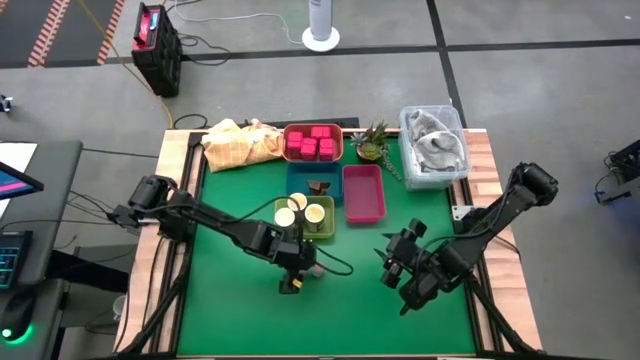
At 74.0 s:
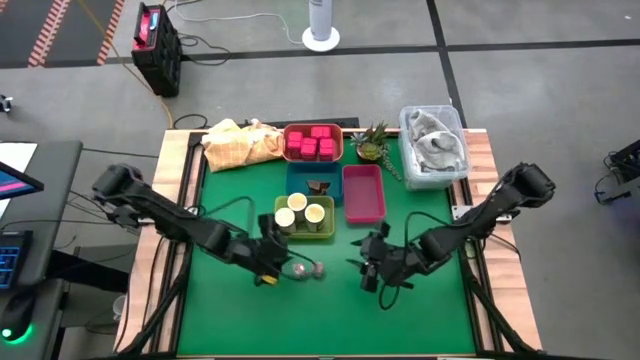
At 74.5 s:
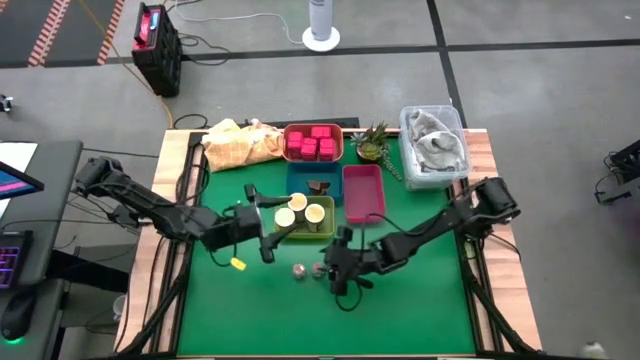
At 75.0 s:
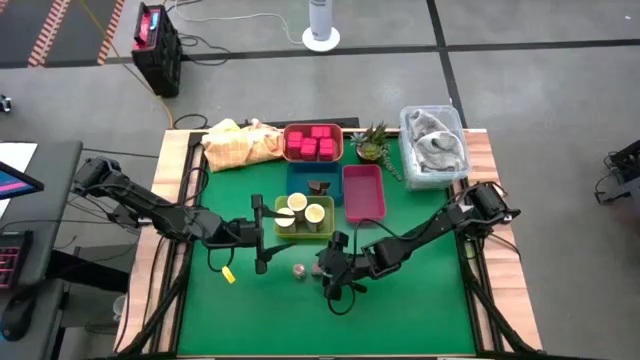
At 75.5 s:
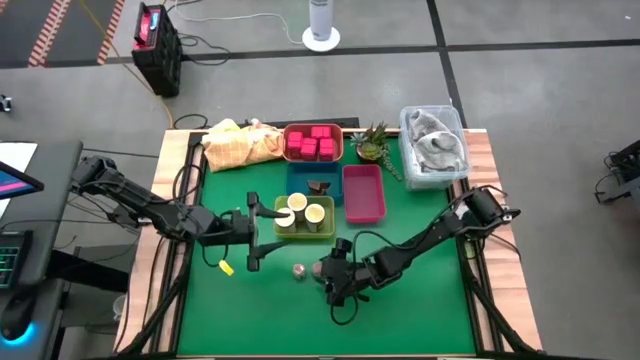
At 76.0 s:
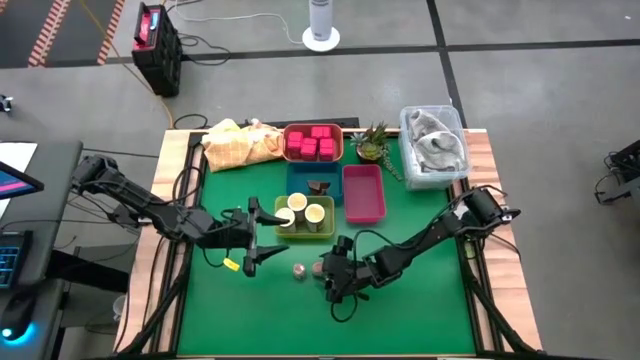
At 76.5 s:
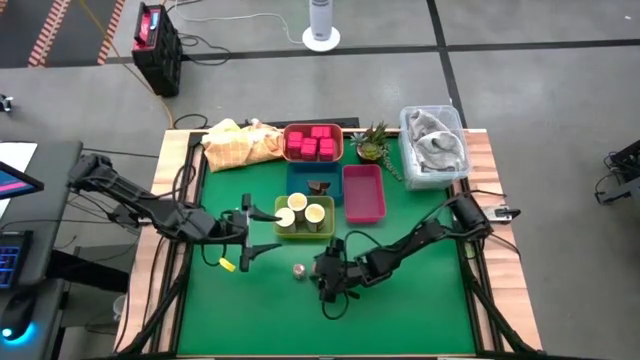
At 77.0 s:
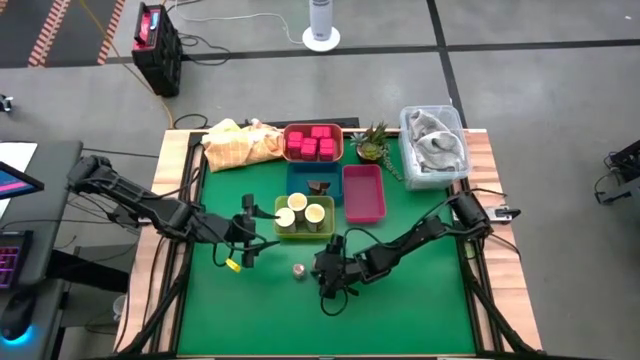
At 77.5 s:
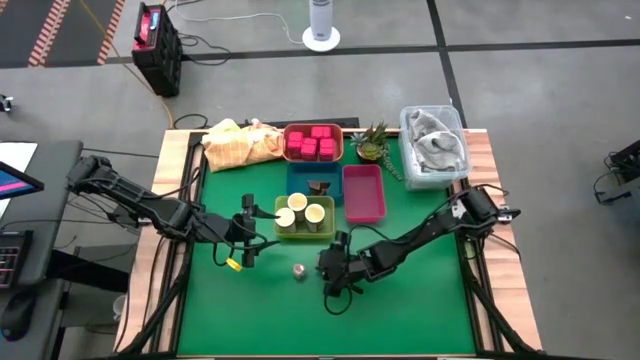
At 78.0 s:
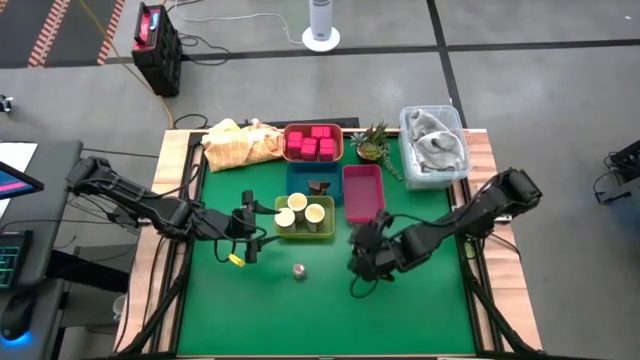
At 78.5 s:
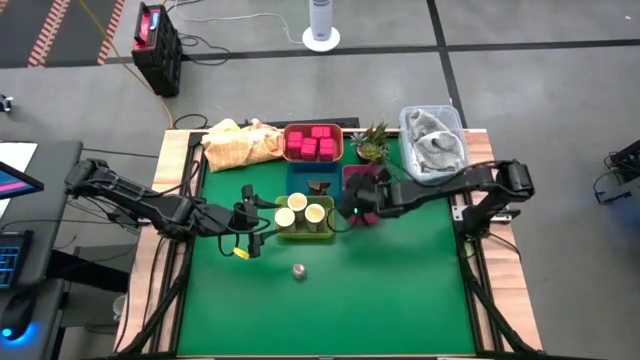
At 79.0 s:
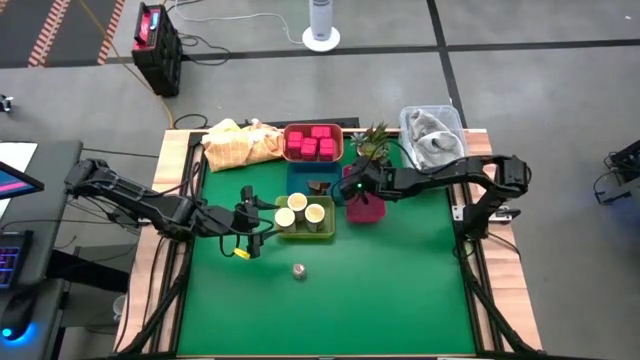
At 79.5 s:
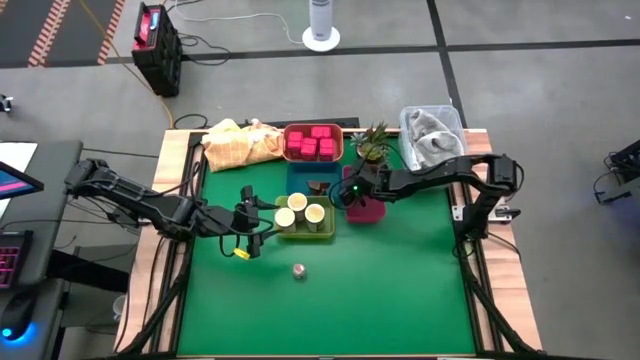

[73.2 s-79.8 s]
Task: Sort spices by type
Put the right transparent seasoning bottle into the red bin

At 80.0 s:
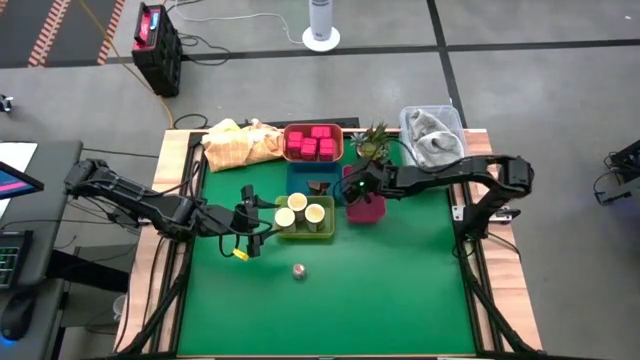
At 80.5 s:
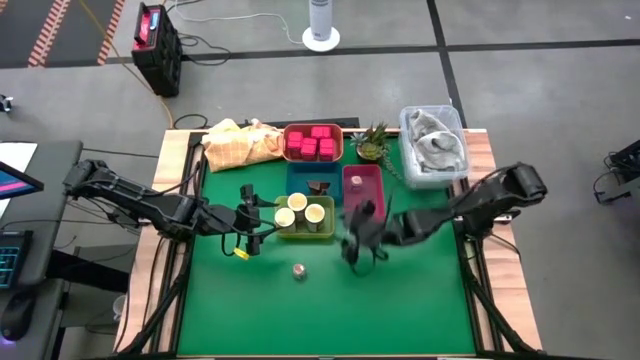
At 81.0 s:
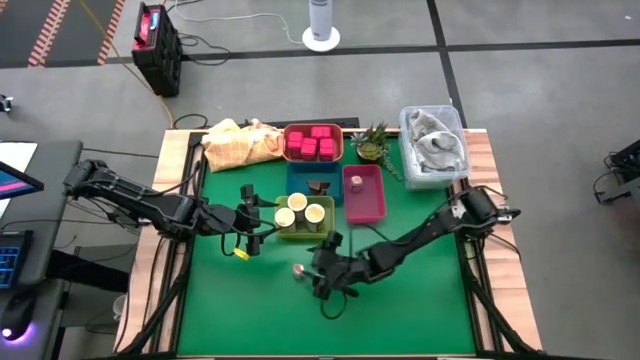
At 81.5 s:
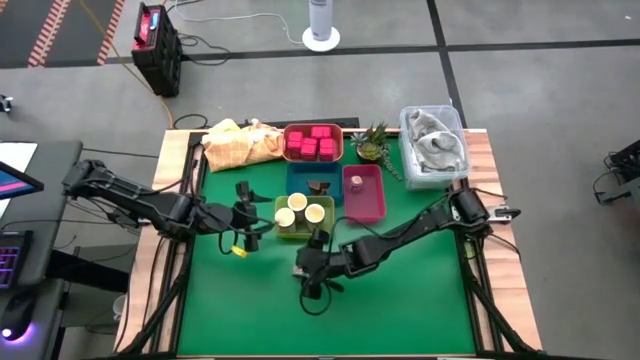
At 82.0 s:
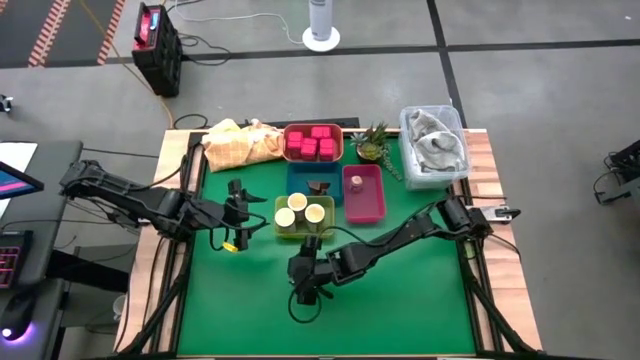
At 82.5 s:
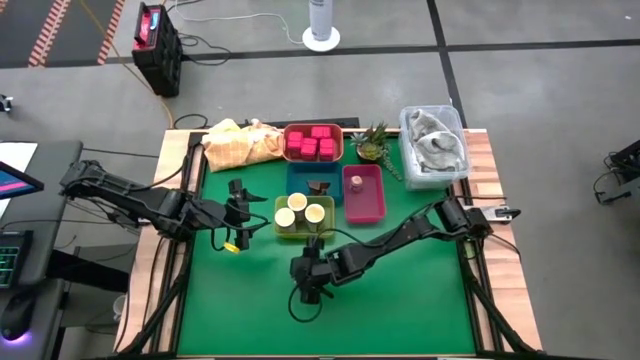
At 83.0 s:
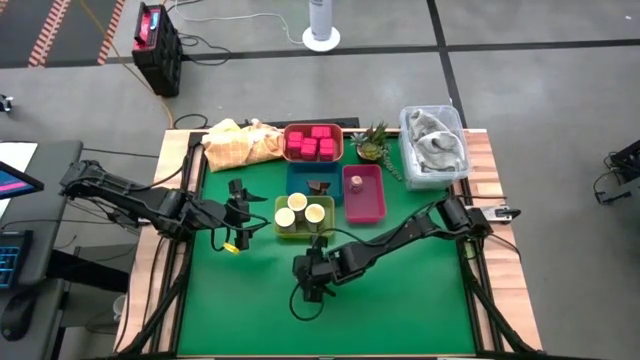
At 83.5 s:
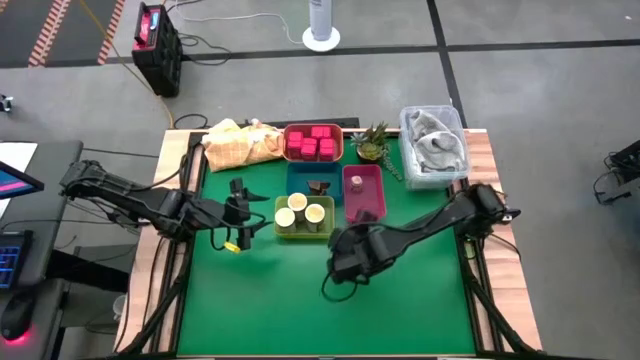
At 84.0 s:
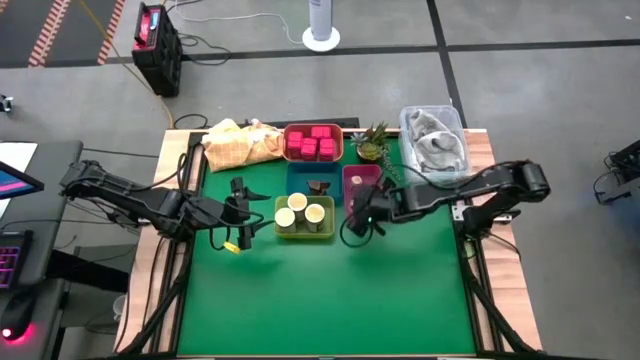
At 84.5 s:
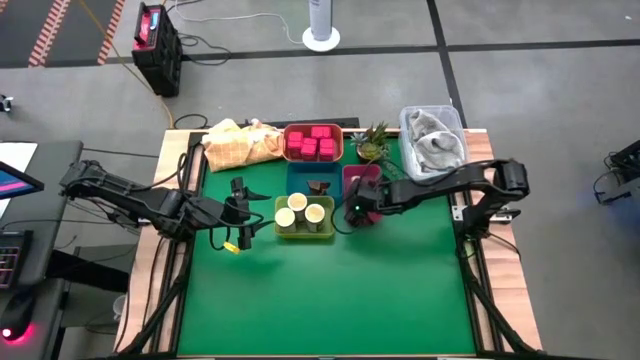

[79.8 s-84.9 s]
Put the transparent seasoning into the red bin

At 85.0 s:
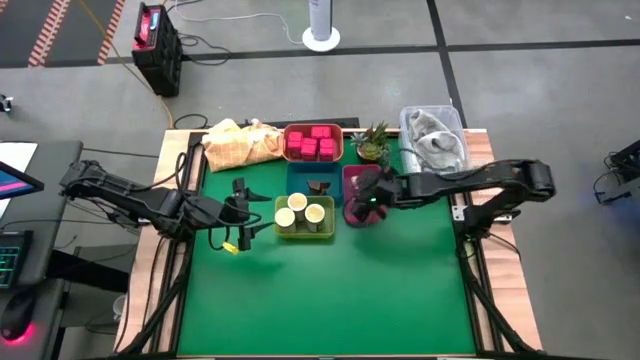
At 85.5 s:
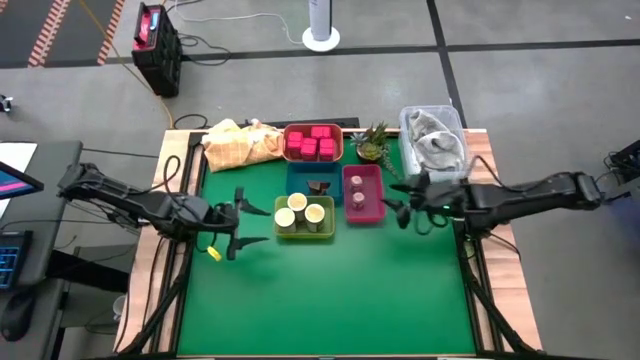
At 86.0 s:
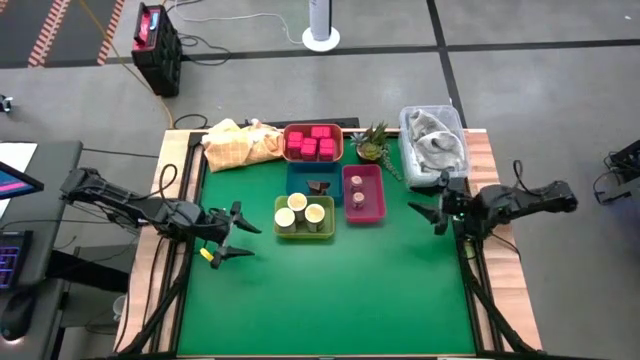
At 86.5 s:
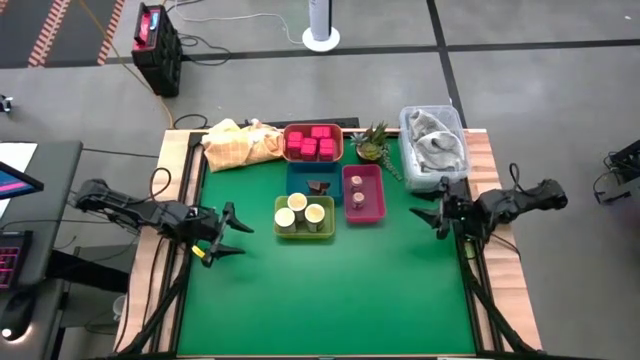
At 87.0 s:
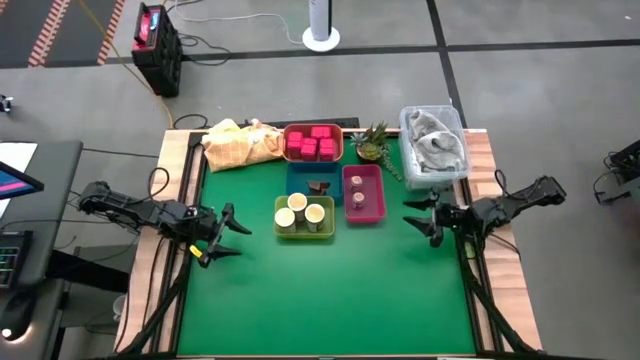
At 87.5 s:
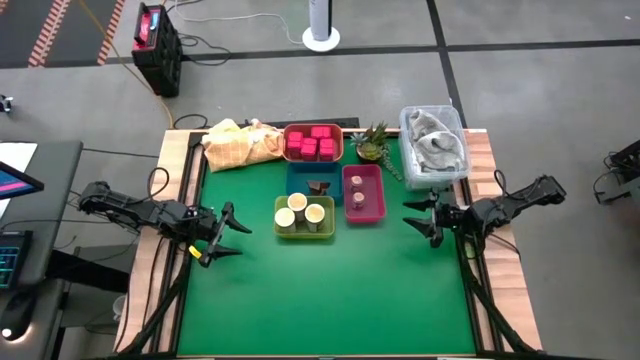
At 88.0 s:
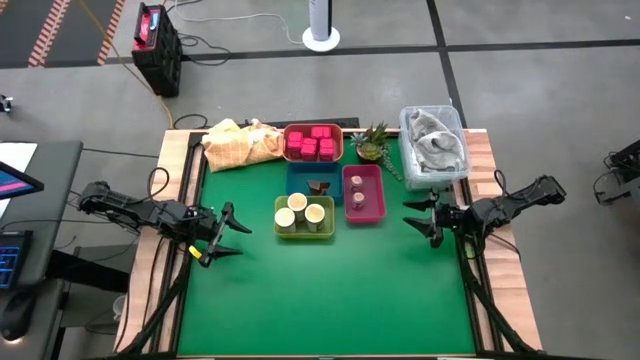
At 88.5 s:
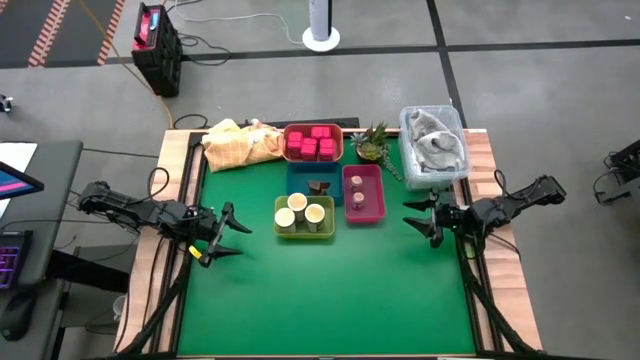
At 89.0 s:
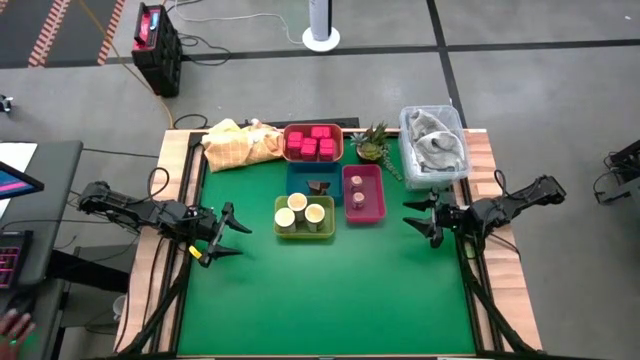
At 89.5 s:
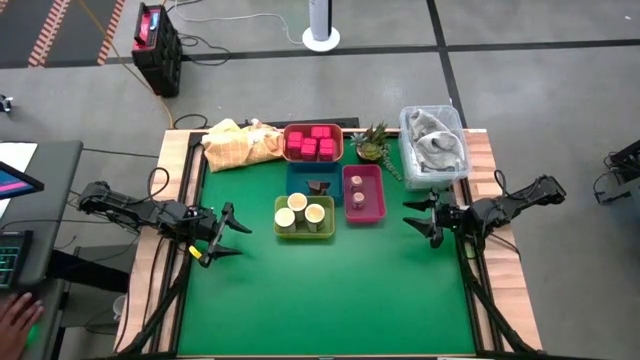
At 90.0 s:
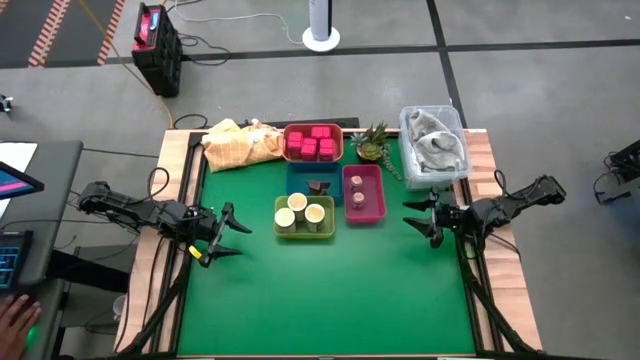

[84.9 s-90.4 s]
Return to Home Position

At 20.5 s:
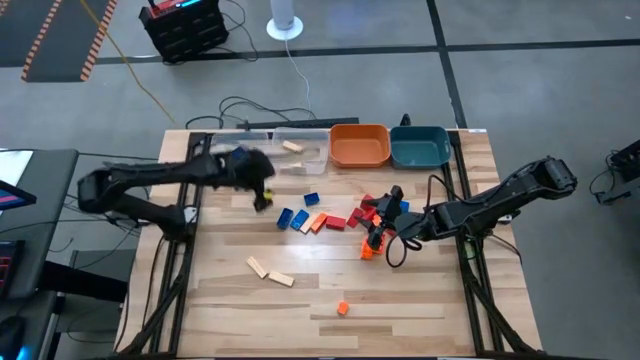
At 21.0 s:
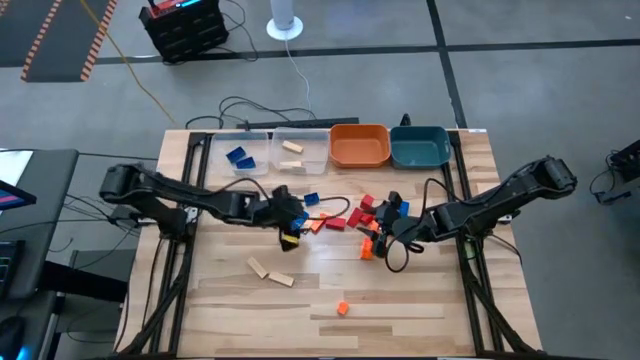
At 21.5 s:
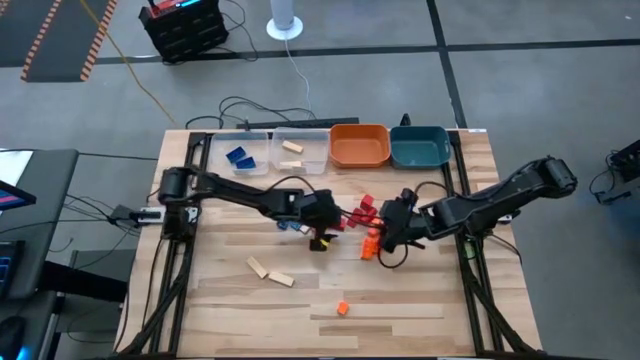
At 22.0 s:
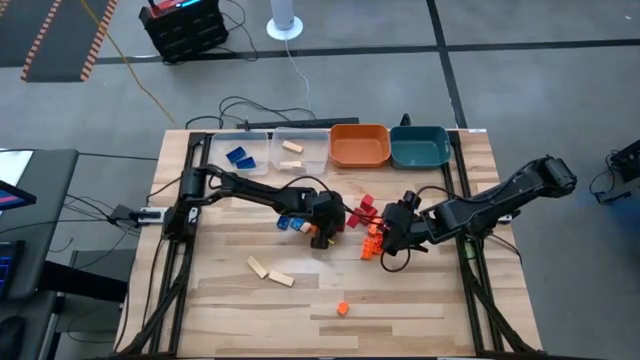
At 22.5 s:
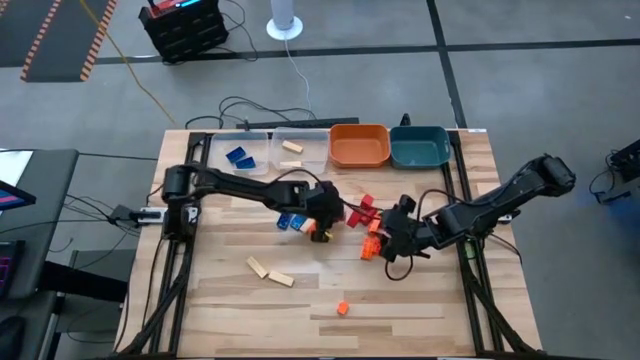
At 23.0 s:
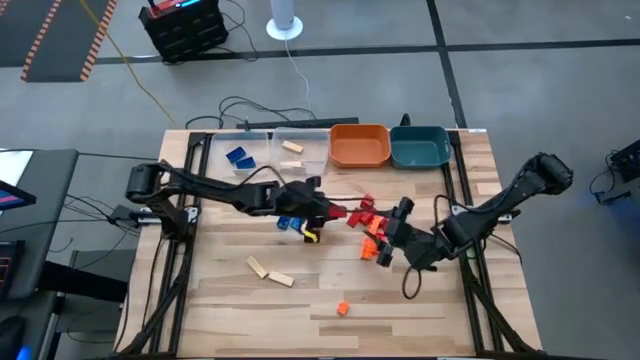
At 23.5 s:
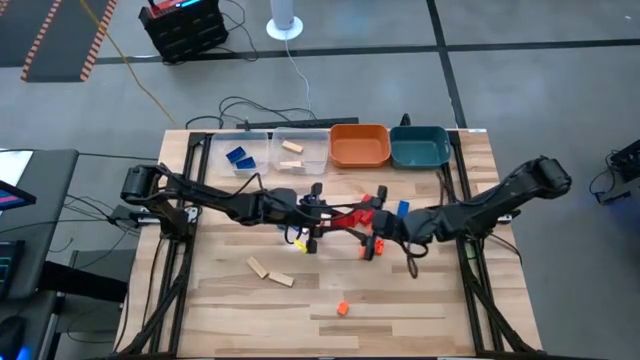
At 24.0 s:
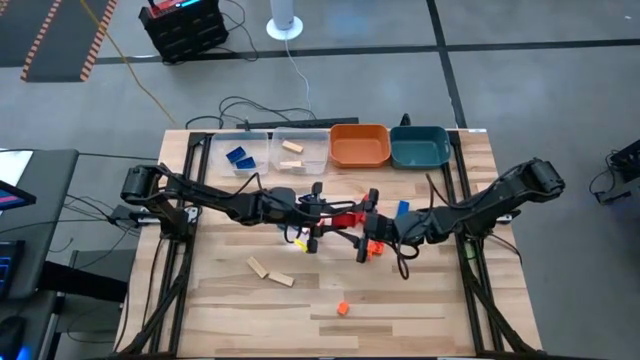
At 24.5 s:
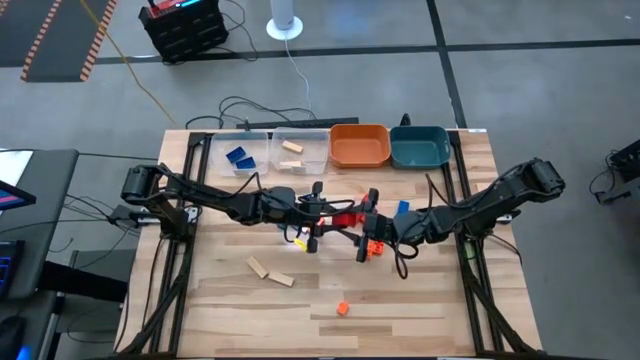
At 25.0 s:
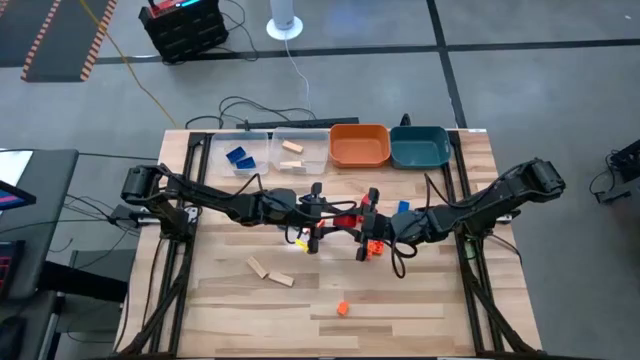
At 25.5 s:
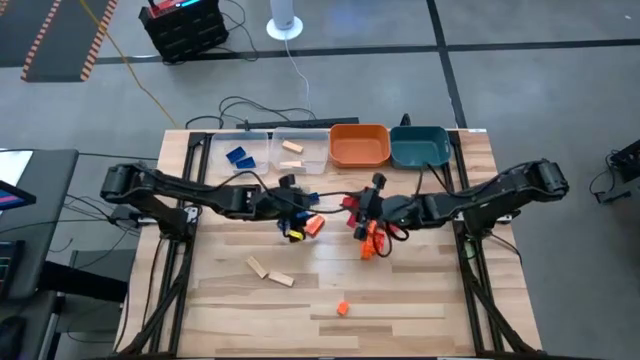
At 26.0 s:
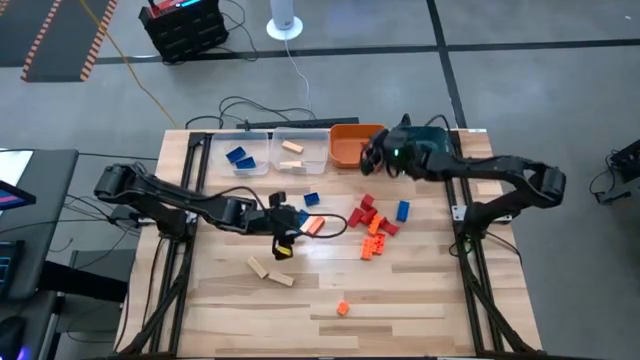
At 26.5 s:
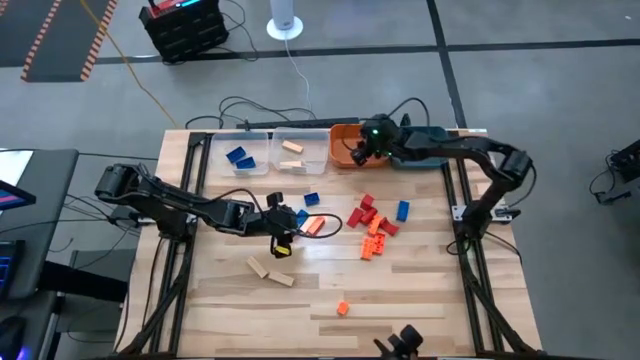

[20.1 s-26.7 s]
Task: Sort blocks
Put the red block into the orange bin
